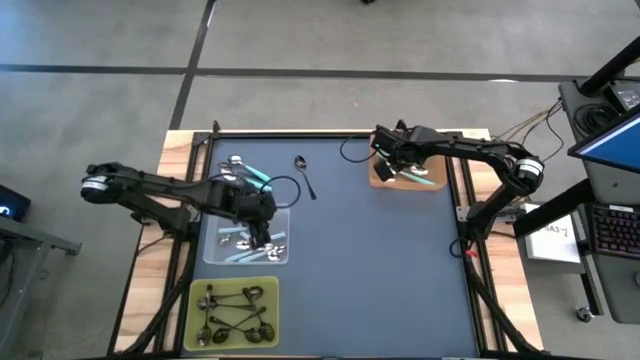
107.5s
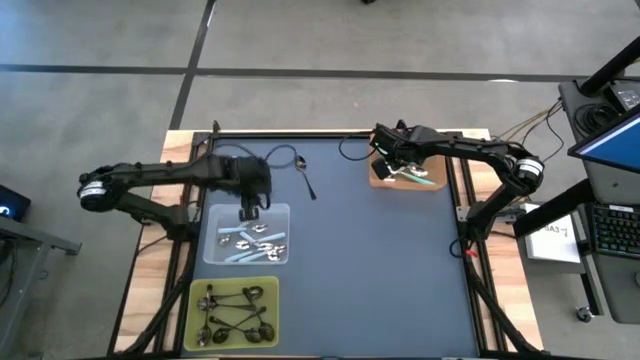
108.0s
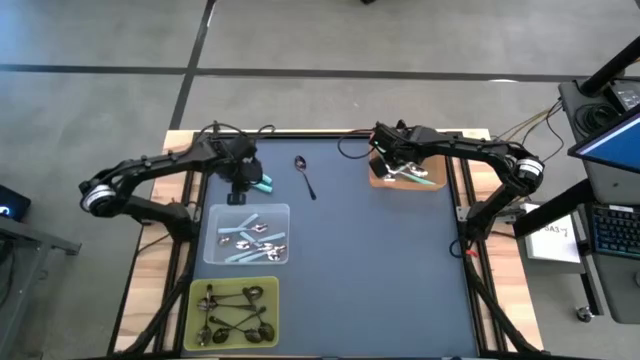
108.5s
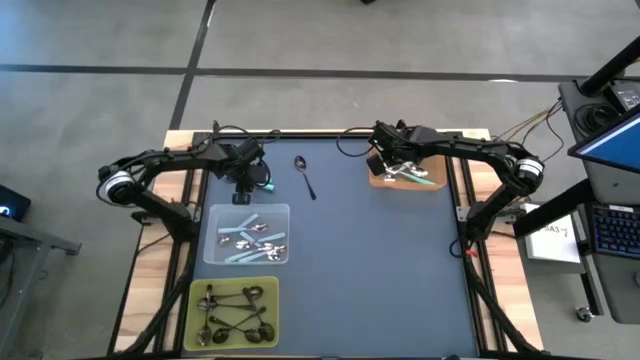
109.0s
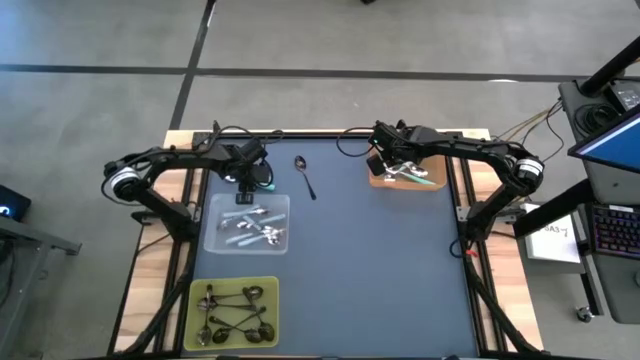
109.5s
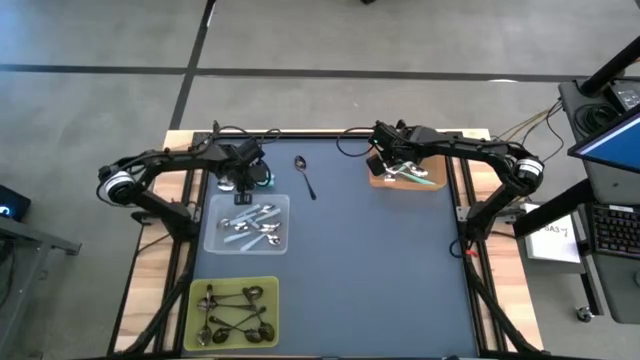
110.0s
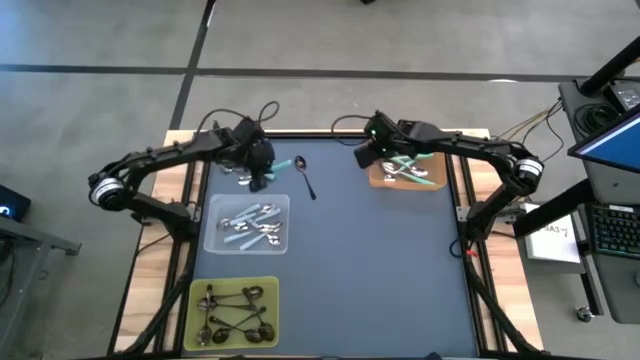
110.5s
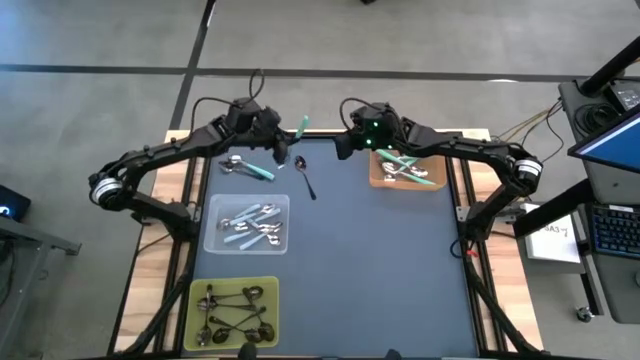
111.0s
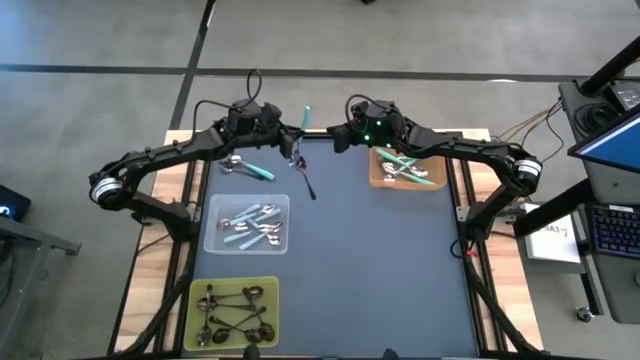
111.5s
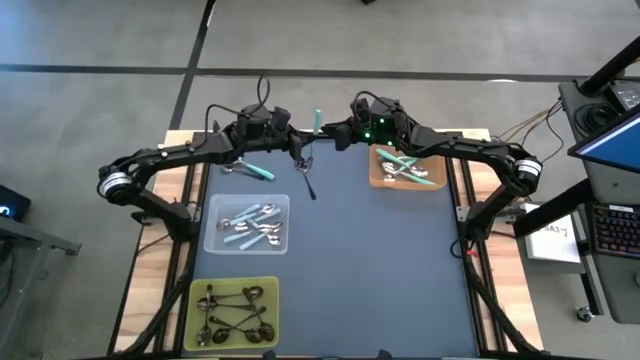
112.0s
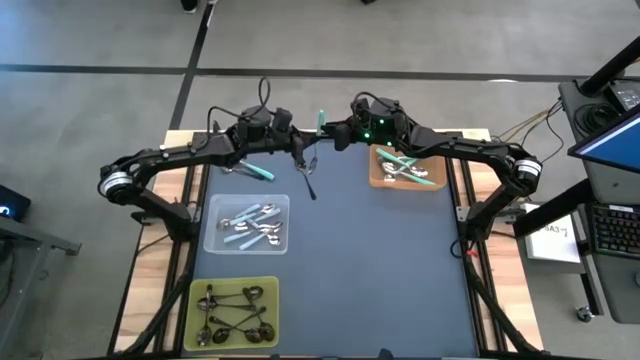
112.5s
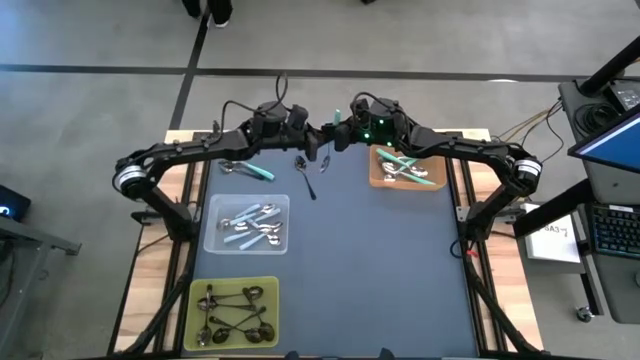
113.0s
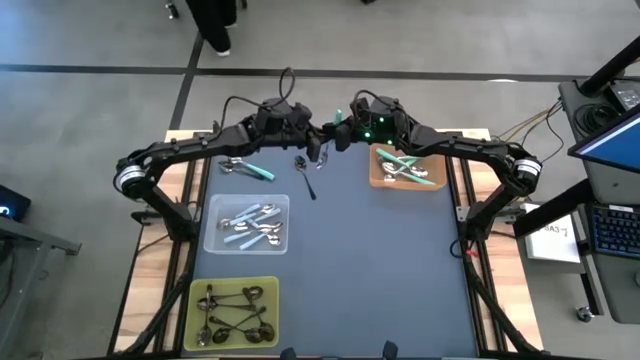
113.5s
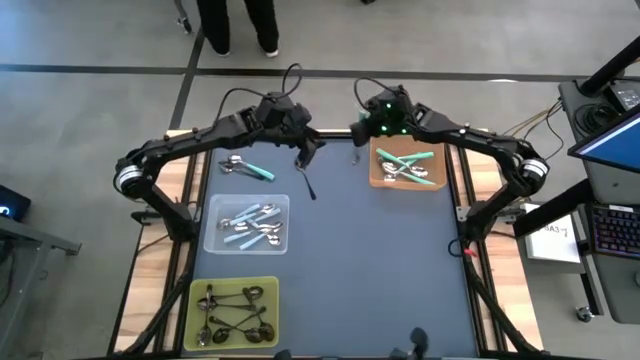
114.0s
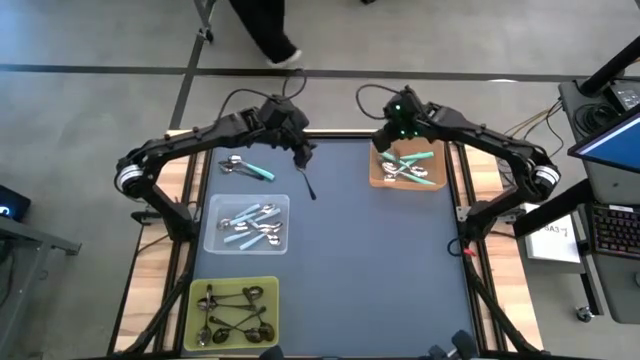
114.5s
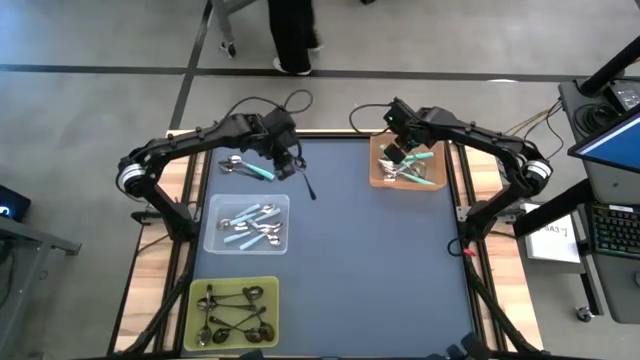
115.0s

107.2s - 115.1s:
Task: Sort silverware by color (type)
Put the green spoon into the orange bin

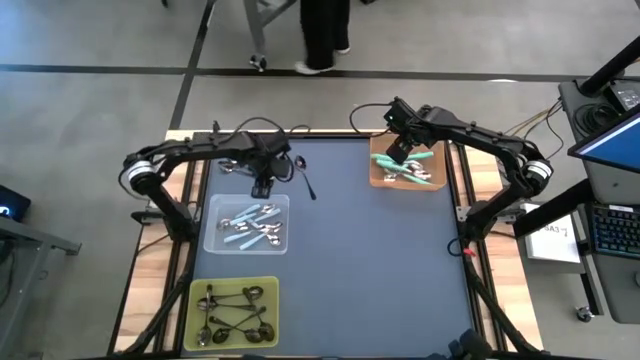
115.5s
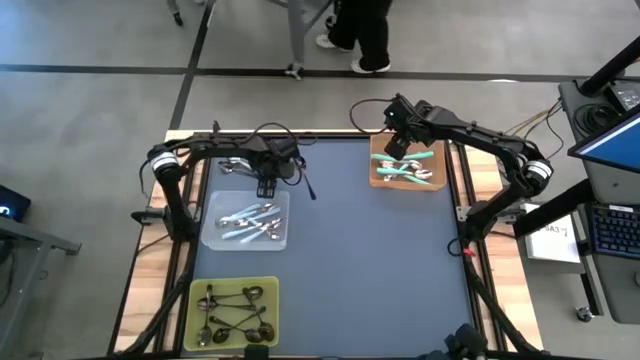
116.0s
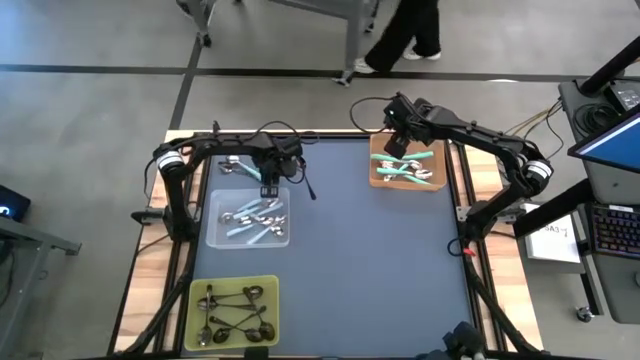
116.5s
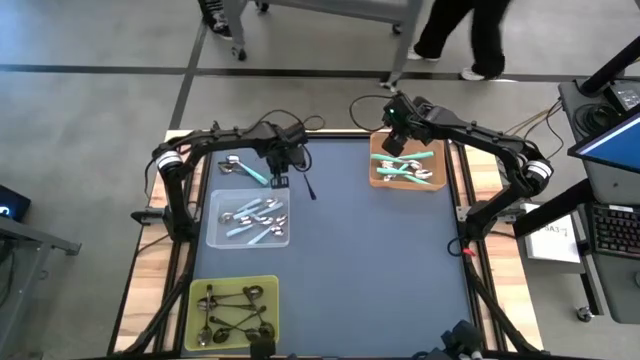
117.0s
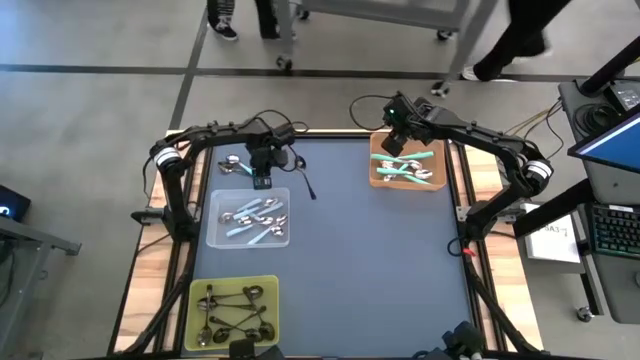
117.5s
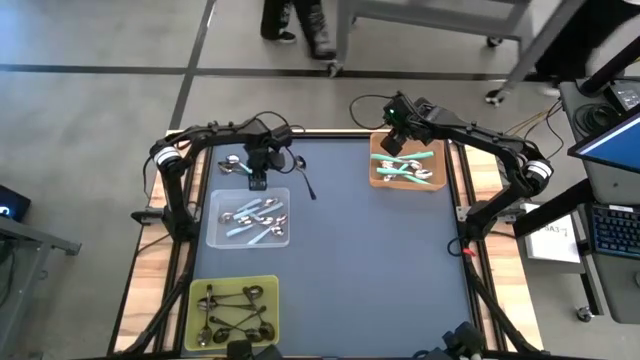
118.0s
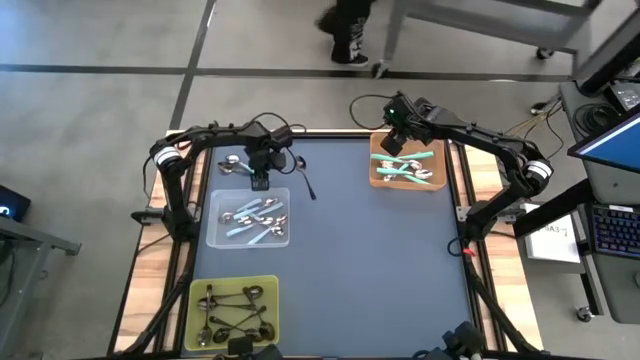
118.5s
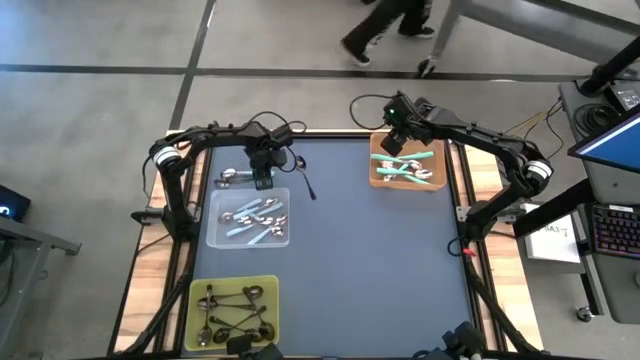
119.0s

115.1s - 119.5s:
Put the green spoon into the orange bin

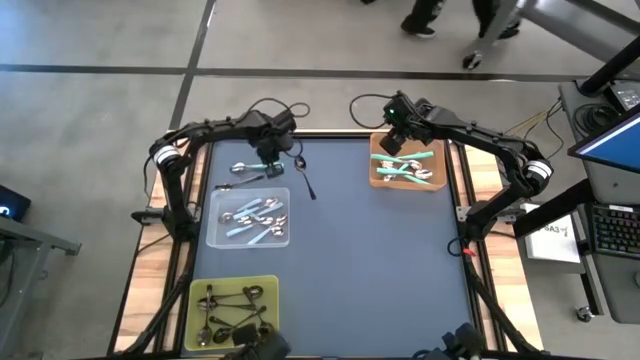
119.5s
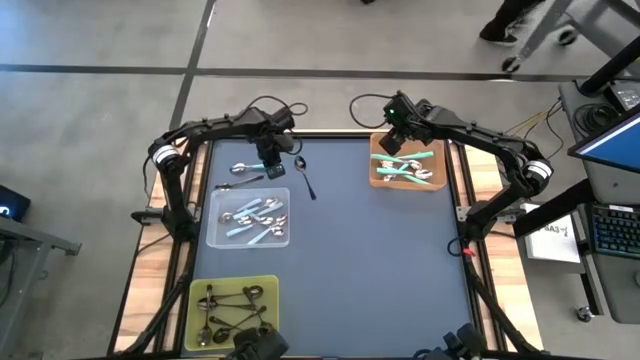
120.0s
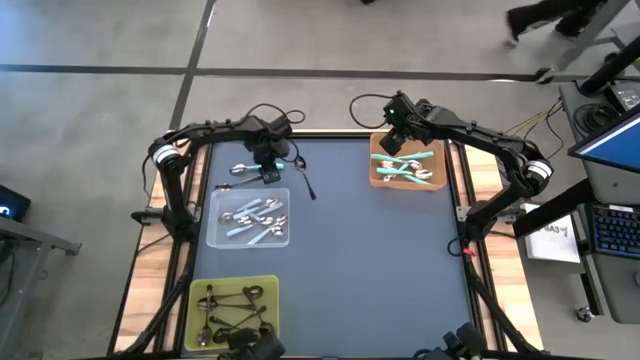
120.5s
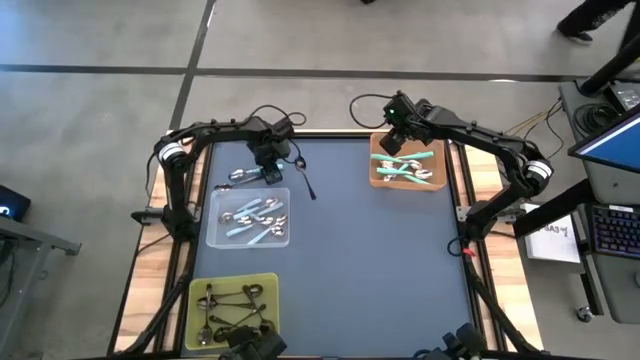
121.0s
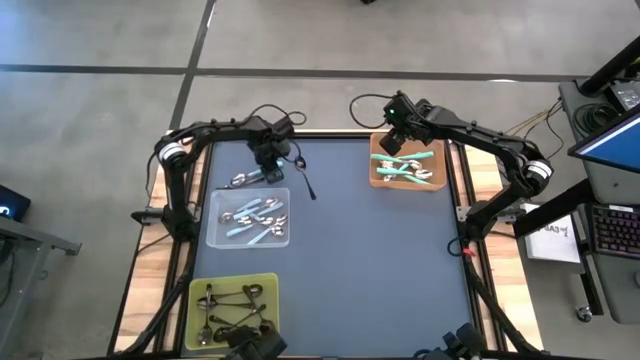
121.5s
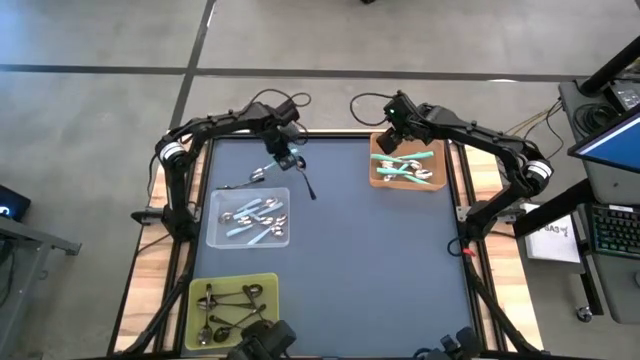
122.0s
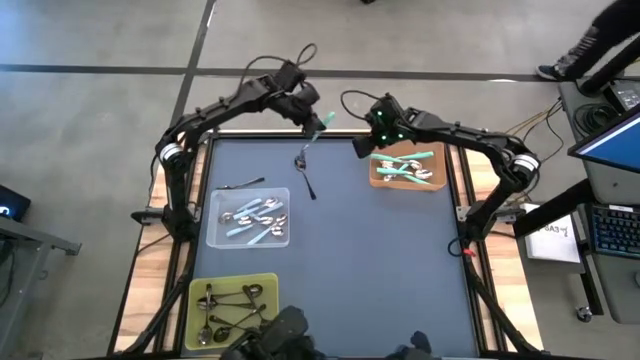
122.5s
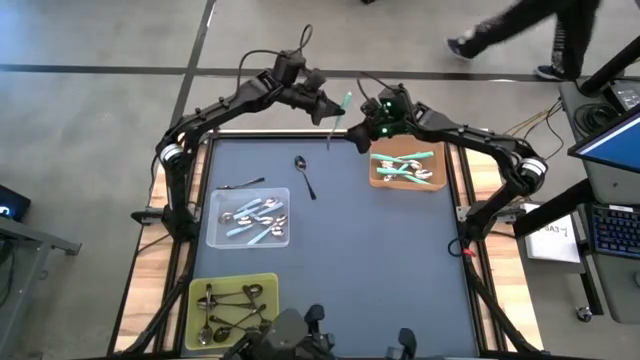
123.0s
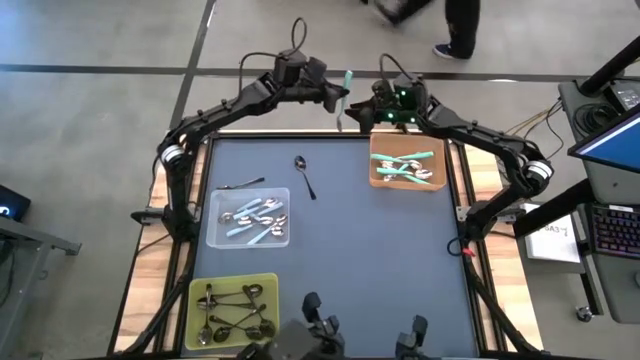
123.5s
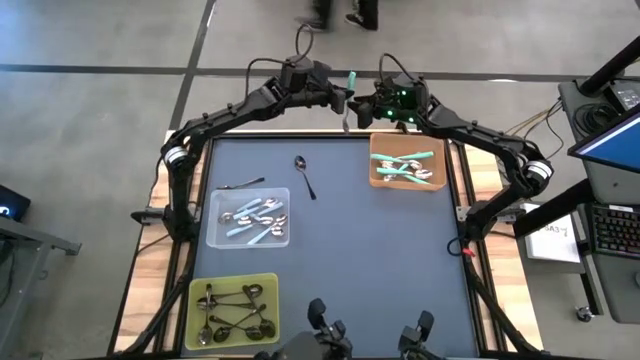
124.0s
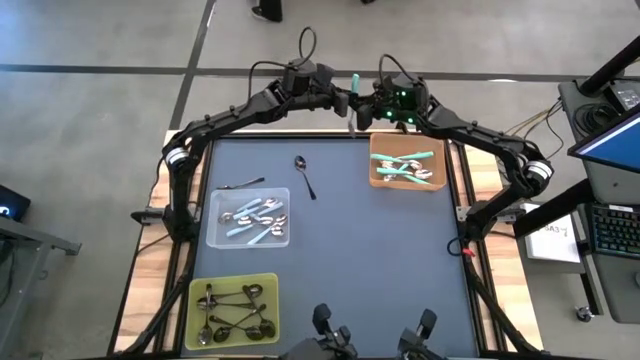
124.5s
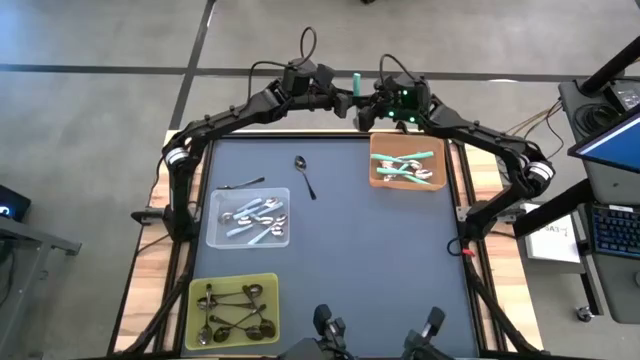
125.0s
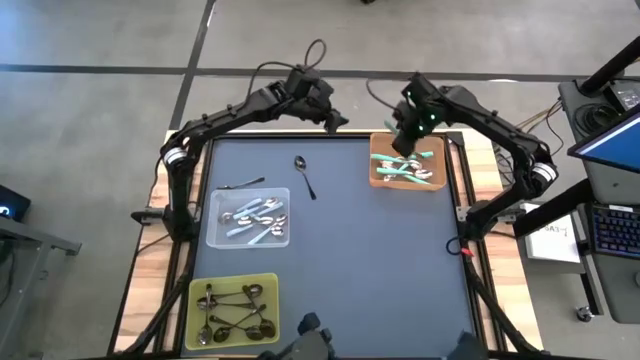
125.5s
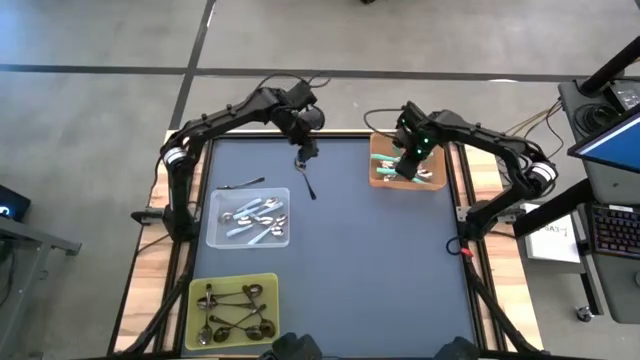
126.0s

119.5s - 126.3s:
Put the green spoon into the orange bin

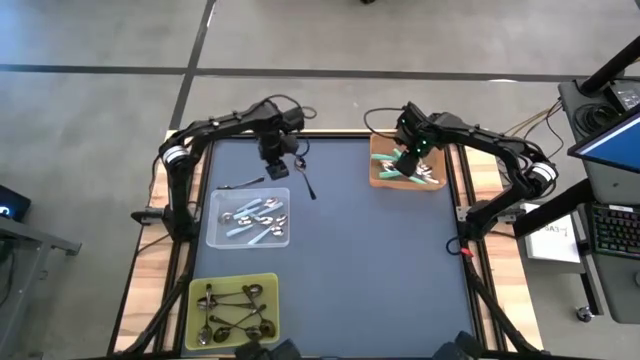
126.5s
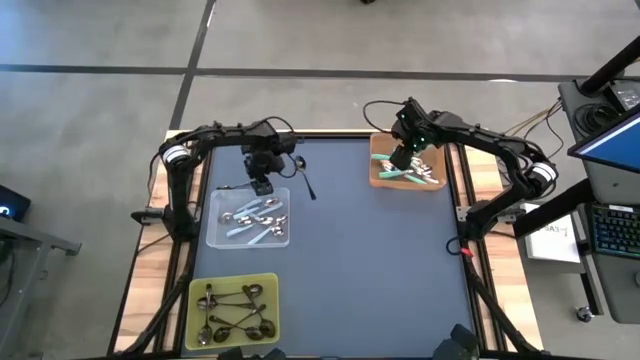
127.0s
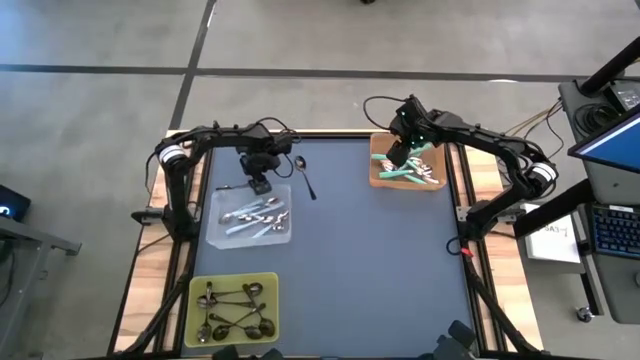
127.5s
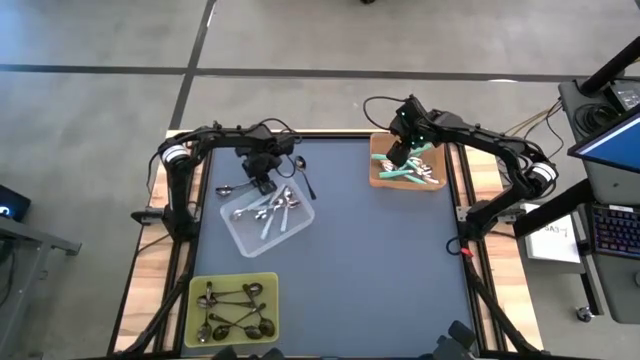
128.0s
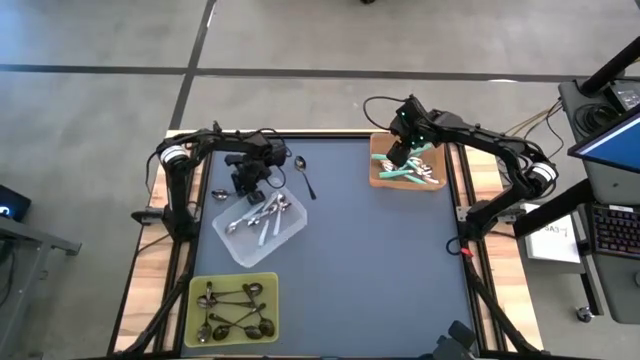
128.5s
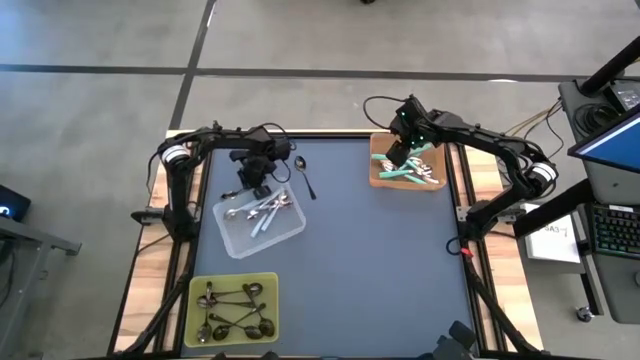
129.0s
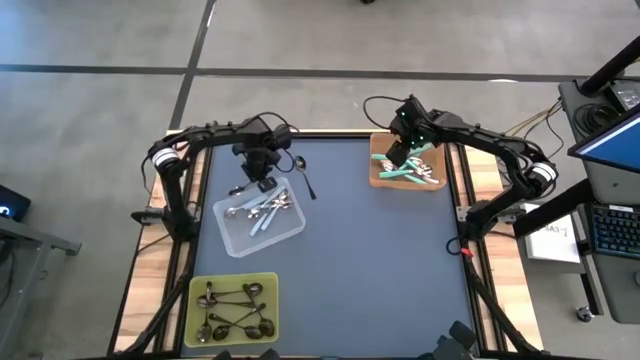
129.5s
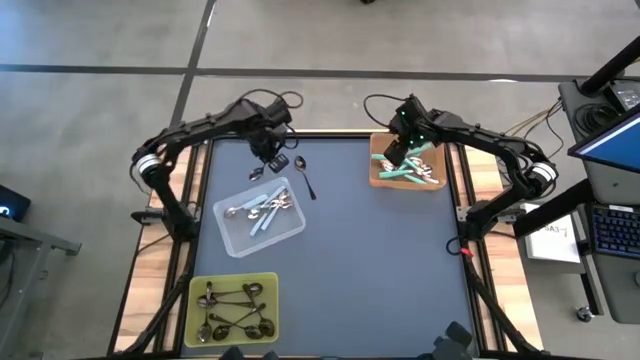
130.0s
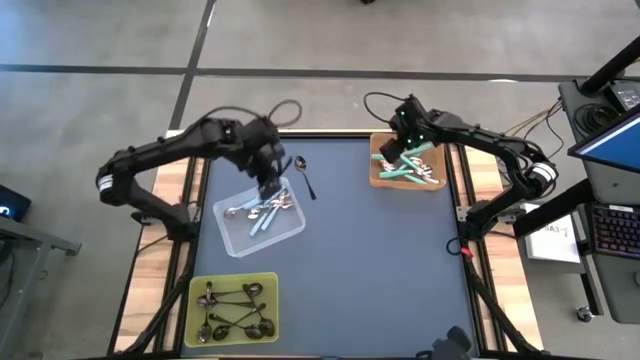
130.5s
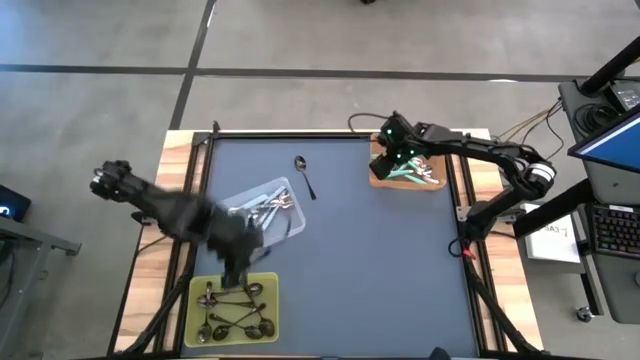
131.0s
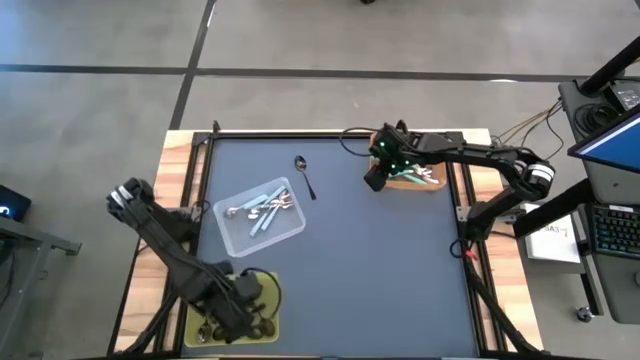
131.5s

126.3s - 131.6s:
Put the black spoon into the yellow bin
